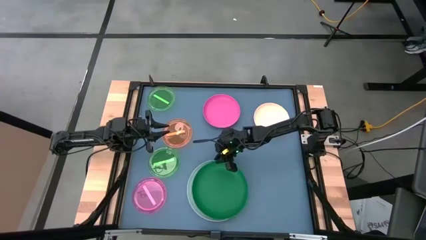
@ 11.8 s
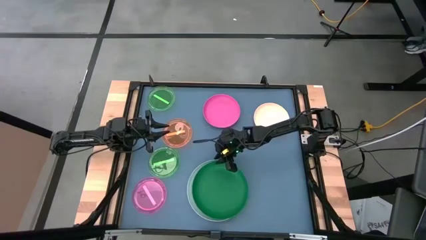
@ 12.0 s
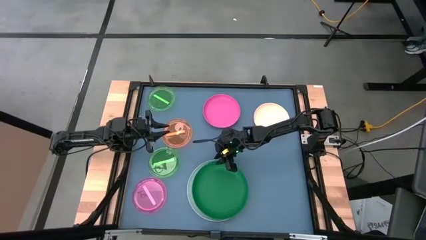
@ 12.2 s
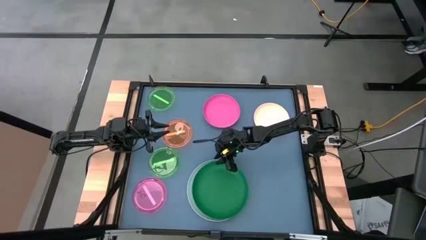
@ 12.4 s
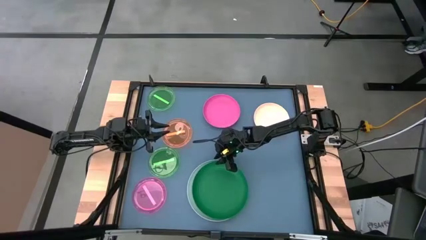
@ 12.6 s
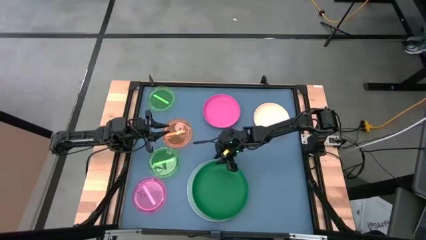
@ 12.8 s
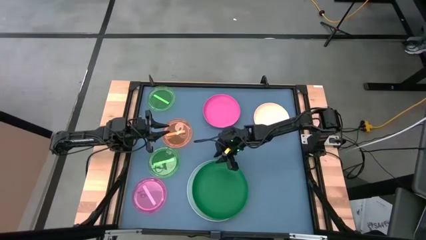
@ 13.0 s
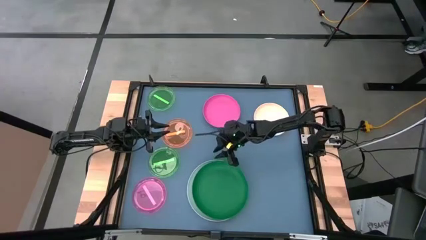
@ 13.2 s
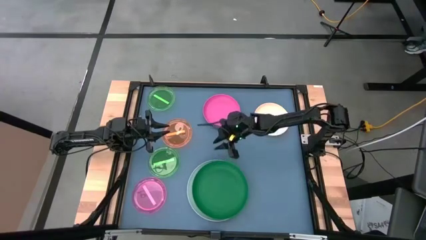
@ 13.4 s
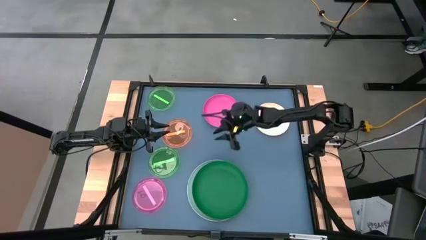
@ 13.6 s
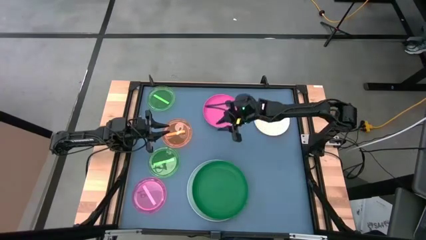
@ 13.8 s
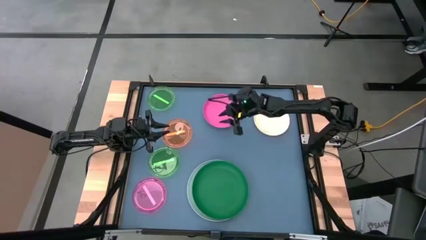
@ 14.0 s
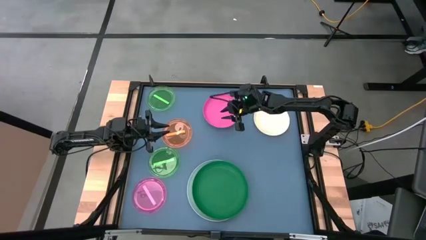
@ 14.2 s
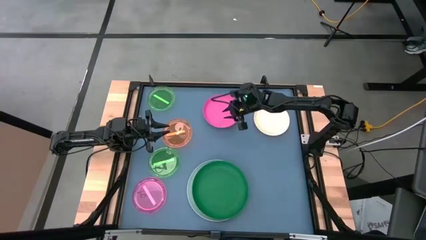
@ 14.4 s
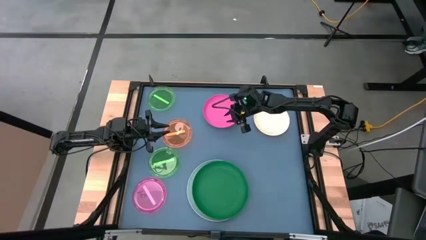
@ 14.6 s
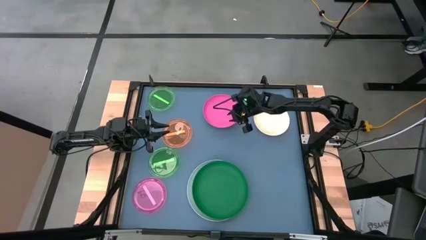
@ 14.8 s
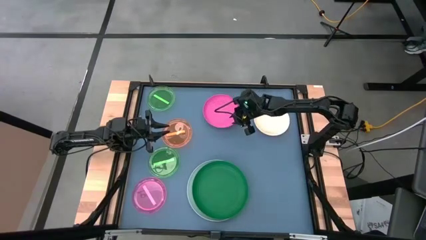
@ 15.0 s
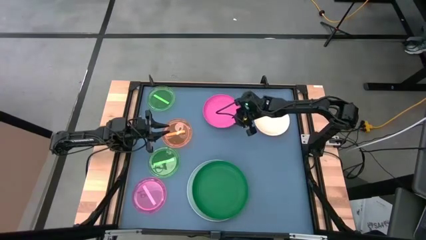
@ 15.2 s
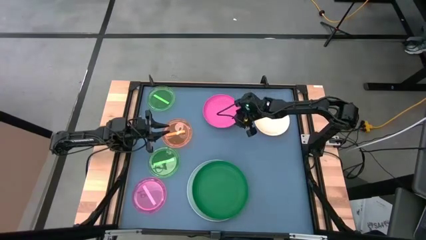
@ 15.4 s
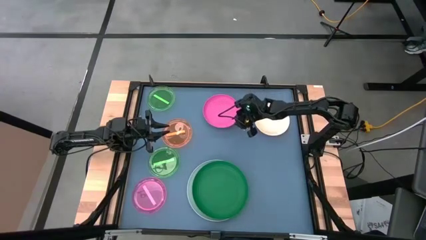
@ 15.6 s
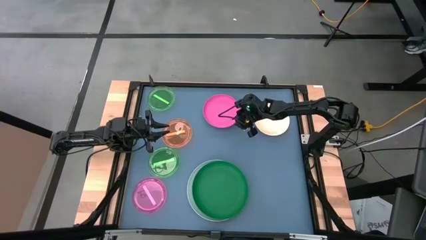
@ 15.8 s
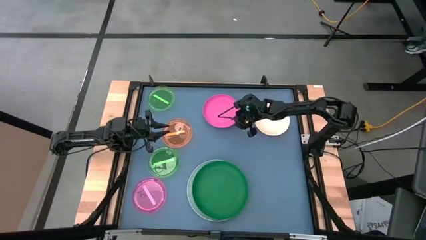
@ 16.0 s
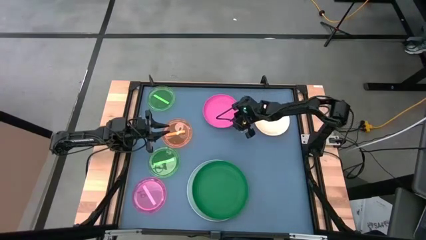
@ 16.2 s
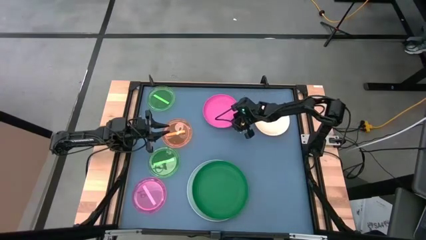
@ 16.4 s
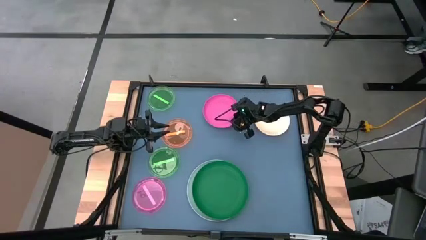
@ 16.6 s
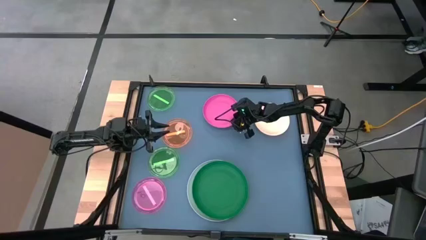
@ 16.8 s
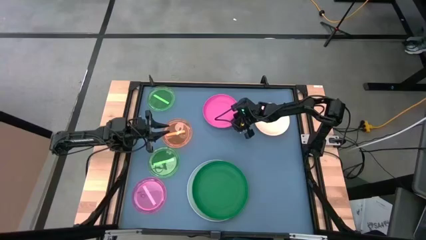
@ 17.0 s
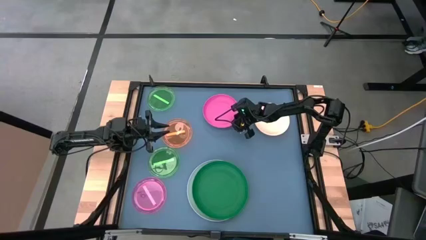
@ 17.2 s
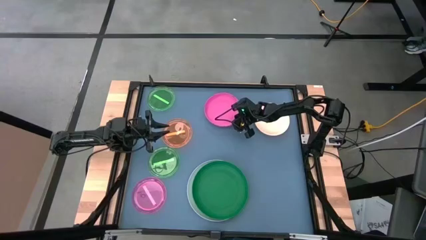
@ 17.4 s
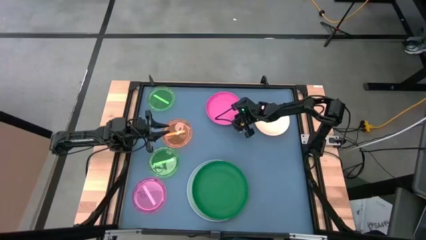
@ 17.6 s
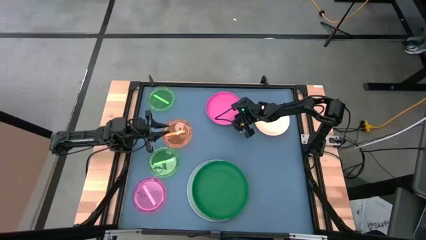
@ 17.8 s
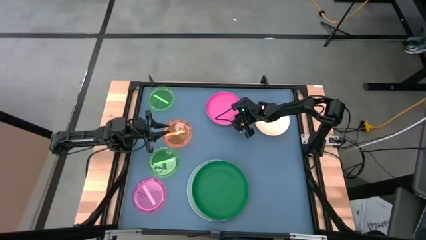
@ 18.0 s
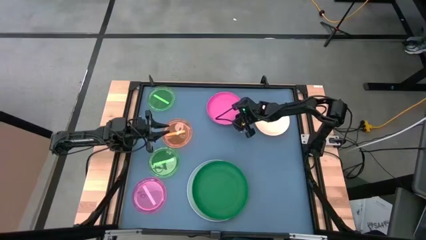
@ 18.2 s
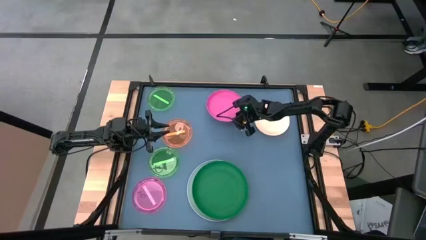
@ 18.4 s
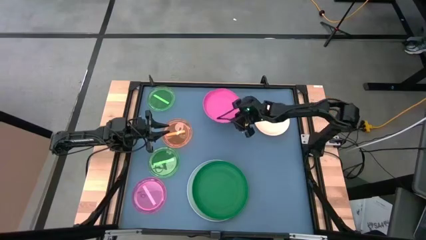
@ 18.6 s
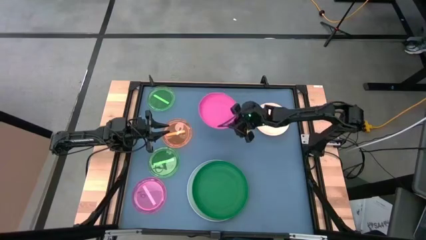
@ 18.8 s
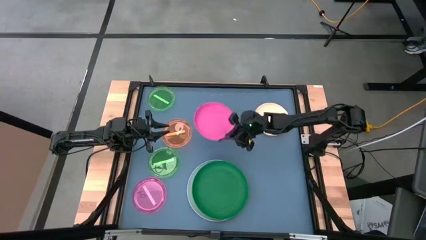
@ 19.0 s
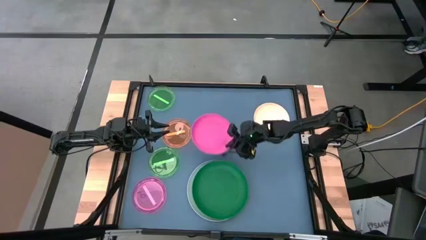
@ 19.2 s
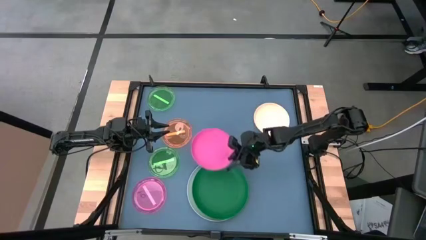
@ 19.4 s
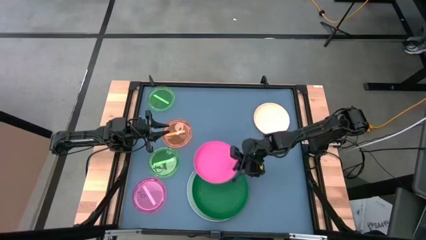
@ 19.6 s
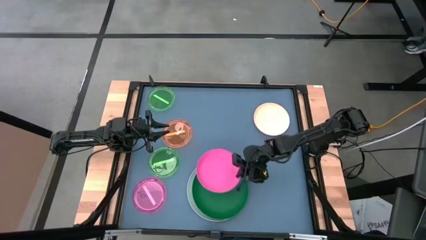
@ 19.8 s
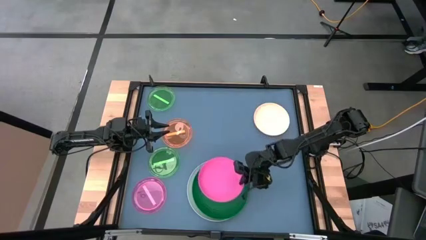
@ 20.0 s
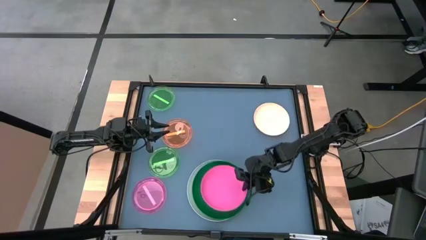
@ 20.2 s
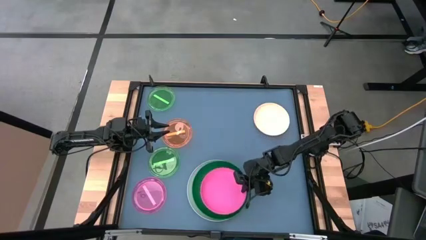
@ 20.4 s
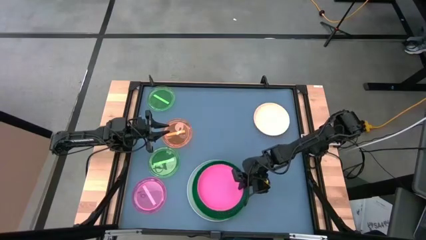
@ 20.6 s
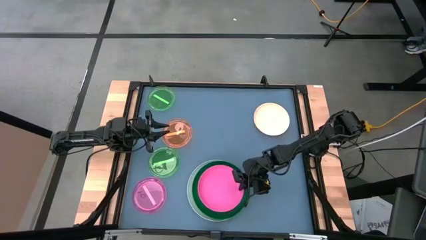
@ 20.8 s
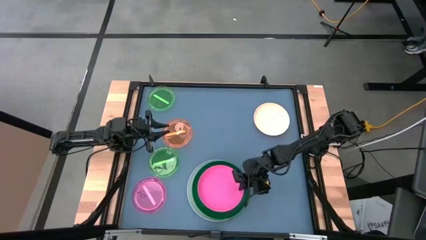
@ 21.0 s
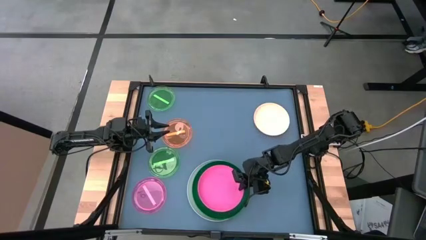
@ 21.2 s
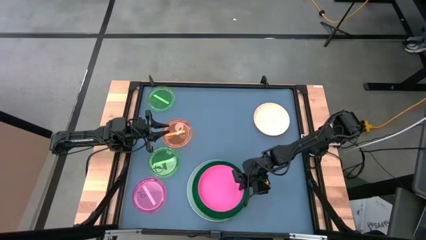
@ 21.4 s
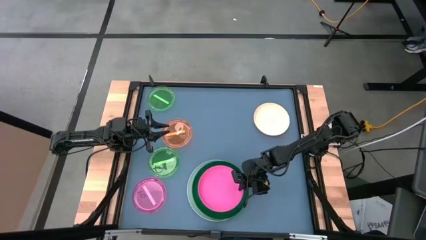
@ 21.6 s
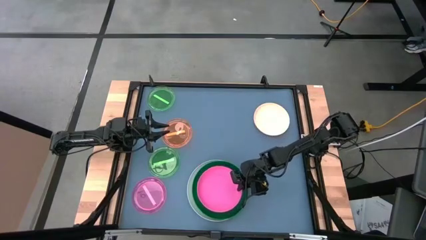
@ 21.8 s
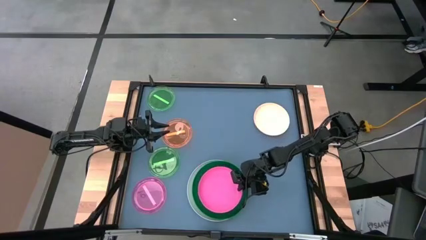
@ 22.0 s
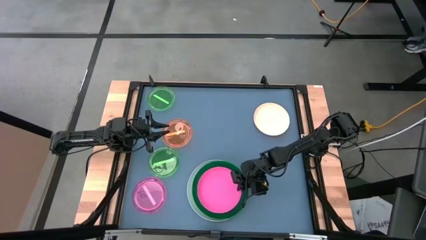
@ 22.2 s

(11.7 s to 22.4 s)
Task: Stack plastic plates
Stack the pink plate on the green plate
